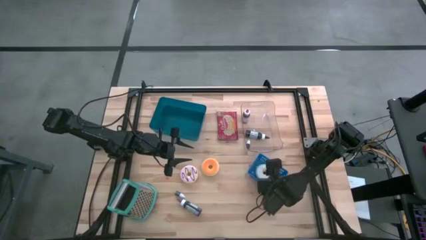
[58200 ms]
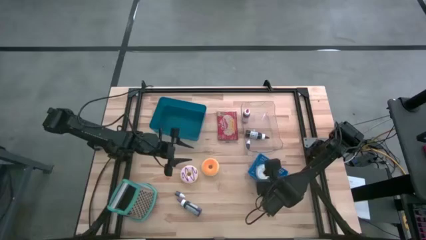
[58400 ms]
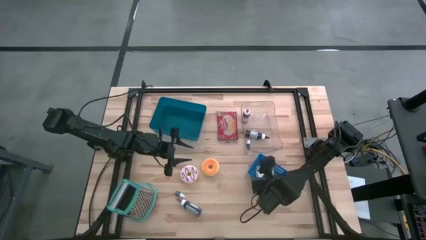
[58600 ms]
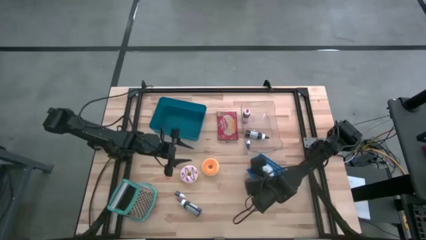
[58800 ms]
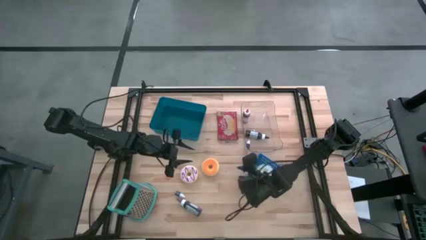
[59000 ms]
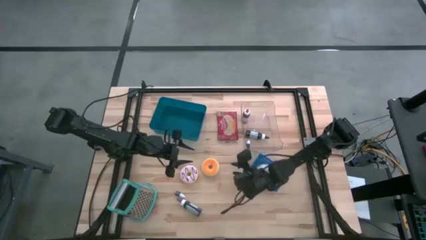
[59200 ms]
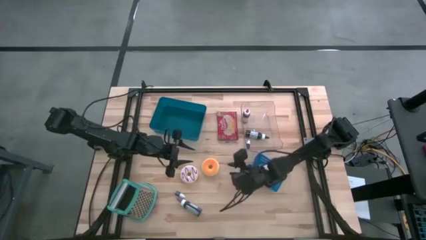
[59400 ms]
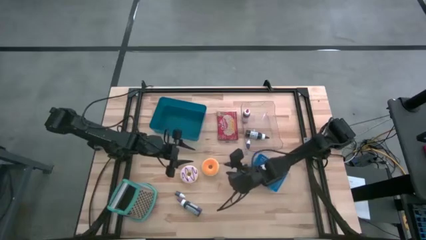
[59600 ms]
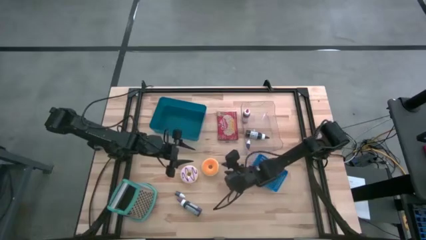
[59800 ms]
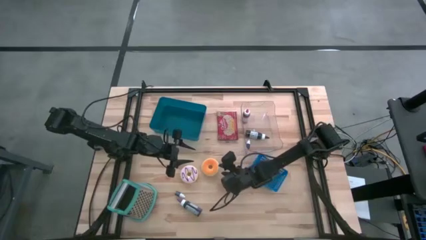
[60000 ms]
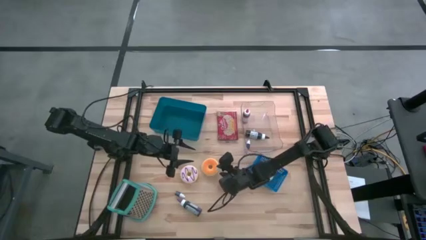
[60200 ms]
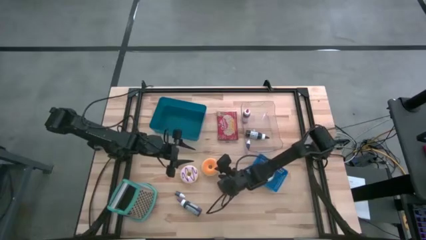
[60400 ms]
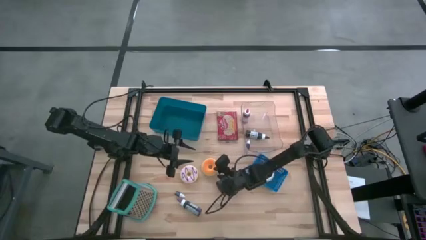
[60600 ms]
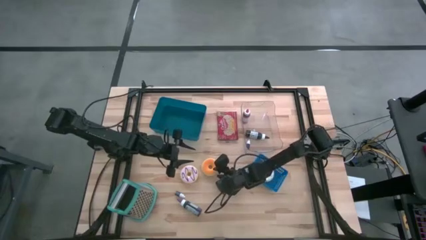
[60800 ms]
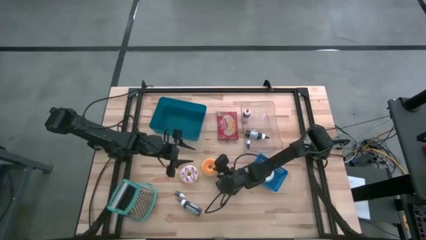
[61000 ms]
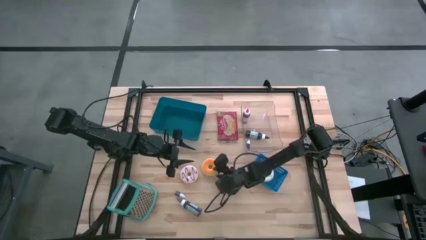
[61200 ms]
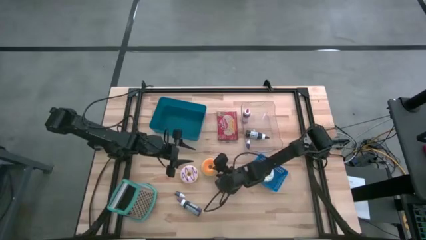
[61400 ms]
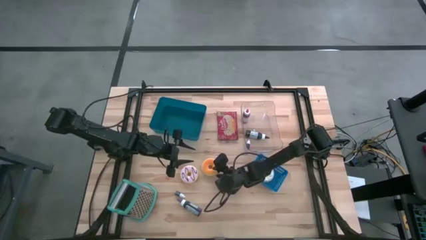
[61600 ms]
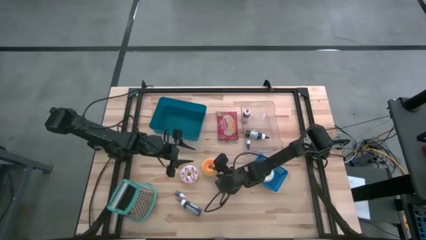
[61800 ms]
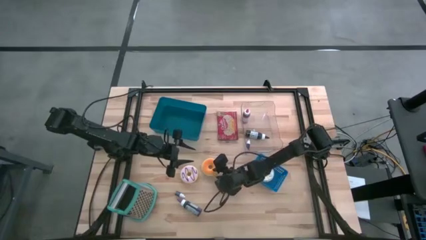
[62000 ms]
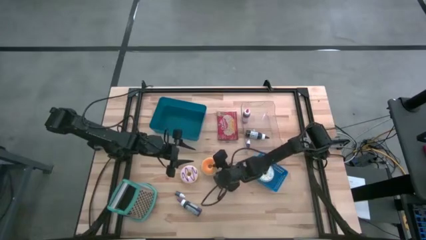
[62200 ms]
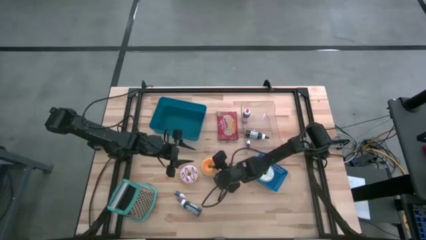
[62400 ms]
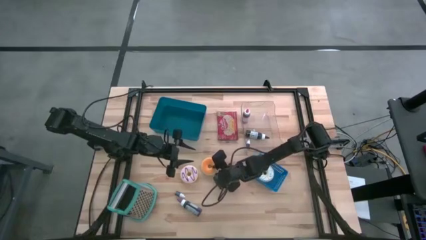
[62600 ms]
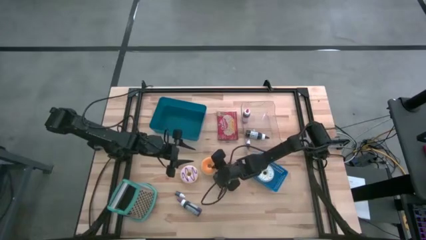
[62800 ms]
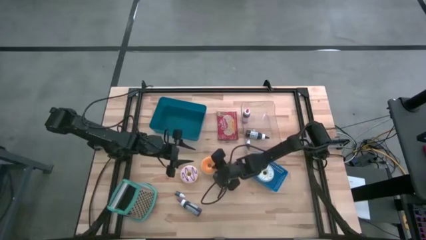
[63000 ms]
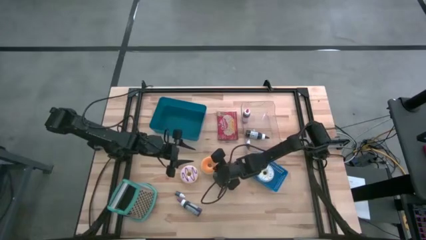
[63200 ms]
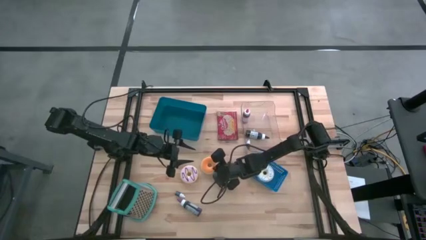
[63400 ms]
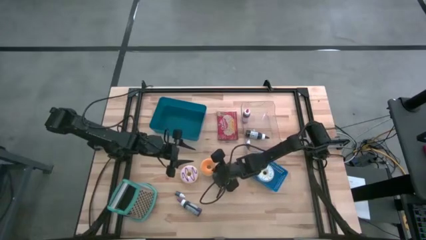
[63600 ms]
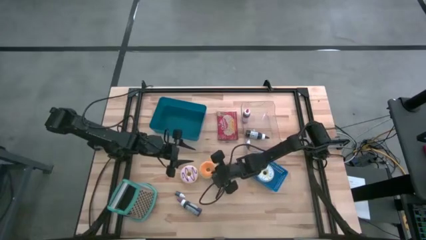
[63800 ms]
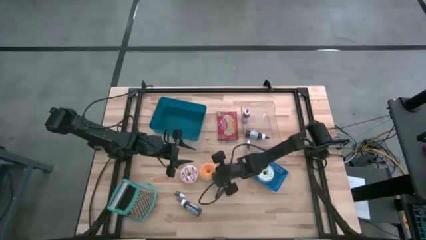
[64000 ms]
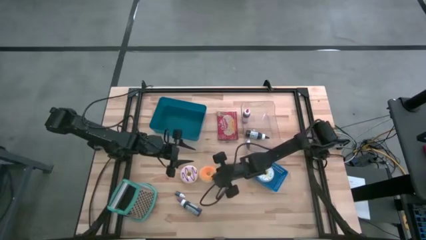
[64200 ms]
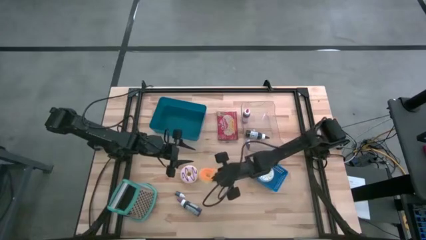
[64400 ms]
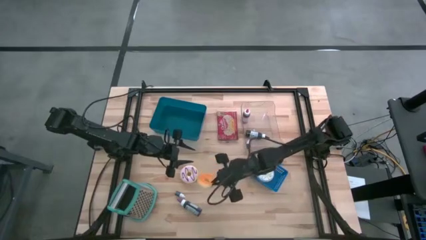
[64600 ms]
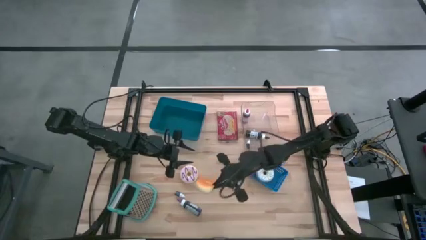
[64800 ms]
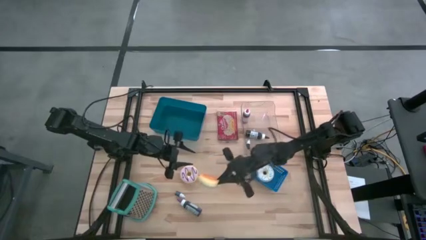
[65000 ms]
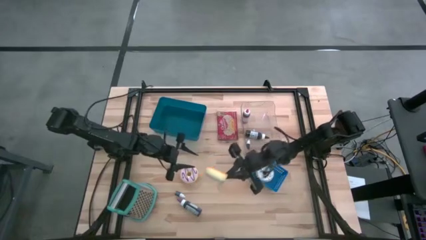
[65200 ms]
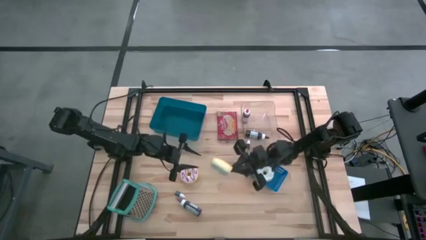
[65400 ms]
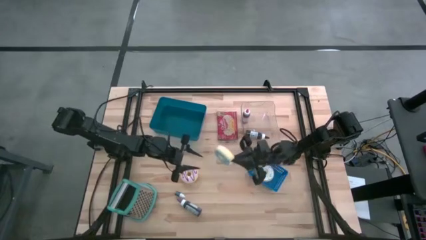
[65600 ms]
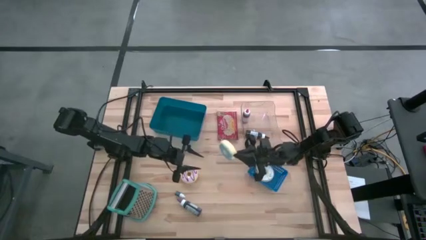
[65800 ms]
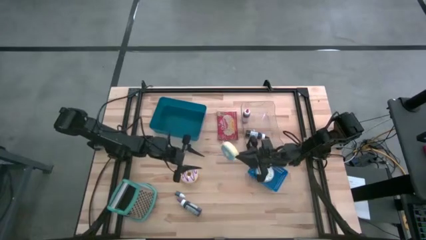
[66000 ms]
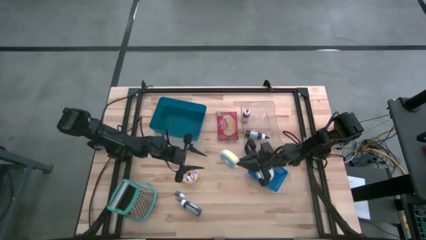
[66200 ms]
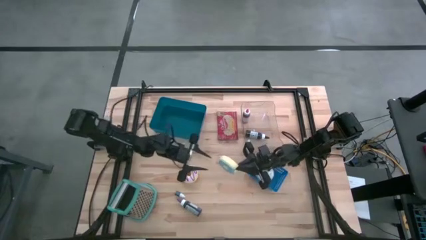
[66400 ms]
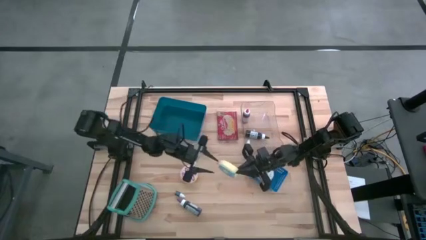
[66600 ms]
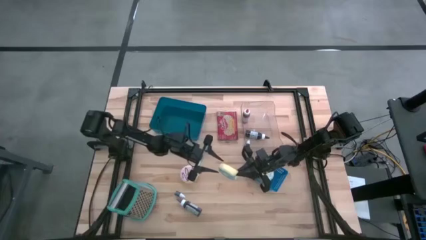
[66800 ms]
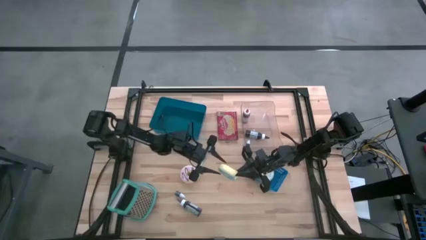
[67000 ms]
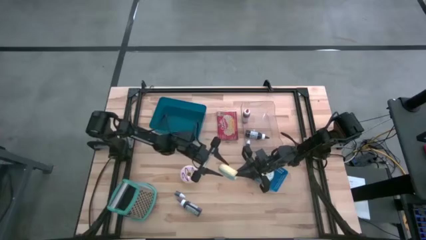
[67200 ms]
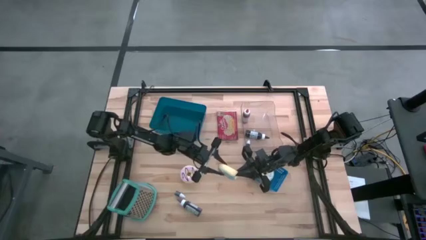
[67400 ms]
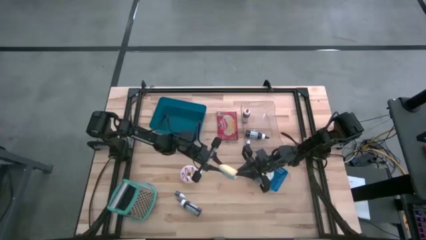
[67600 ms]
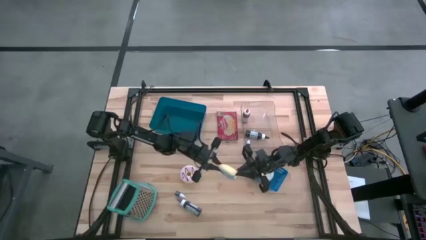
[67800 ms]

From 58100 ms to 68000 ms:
Task: Pick & Place Food Item
Put the orange doughnut into the blue bin

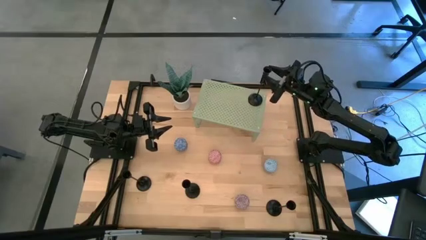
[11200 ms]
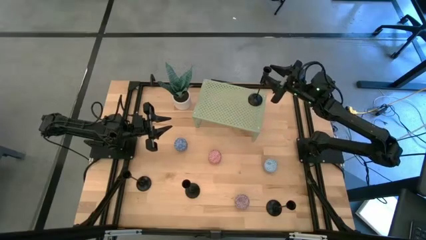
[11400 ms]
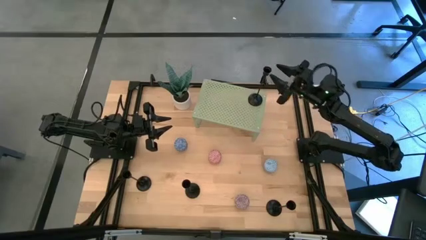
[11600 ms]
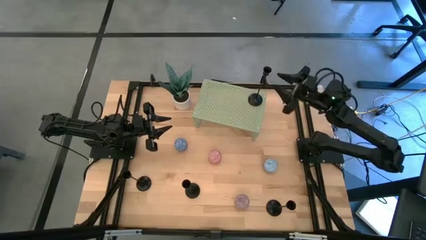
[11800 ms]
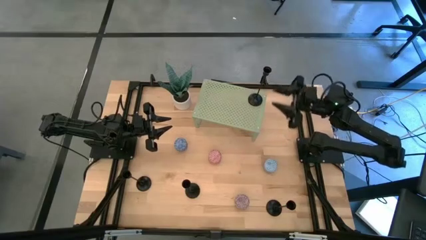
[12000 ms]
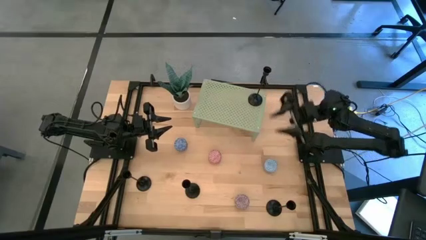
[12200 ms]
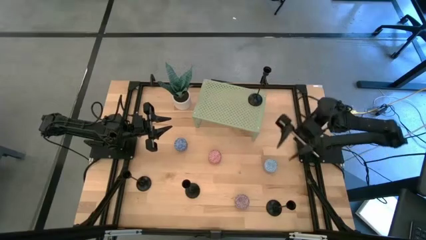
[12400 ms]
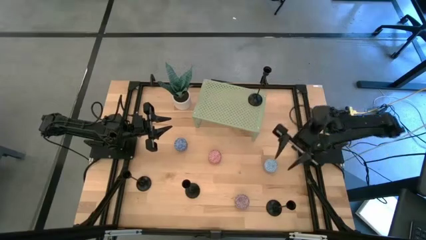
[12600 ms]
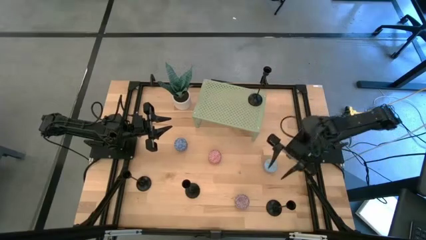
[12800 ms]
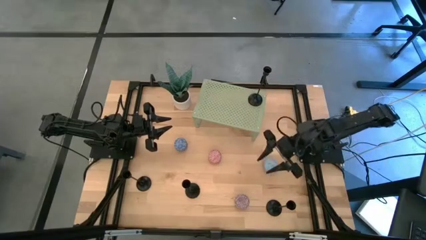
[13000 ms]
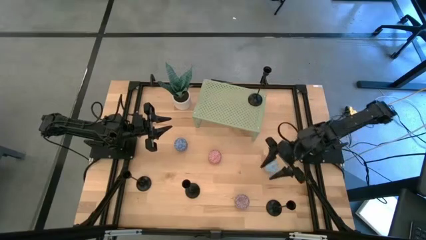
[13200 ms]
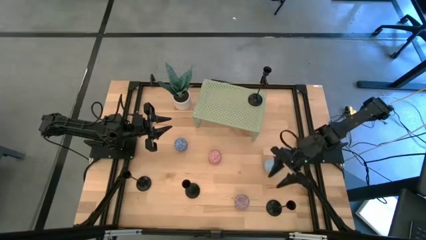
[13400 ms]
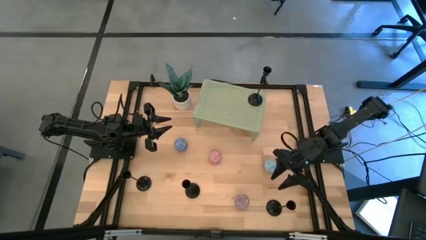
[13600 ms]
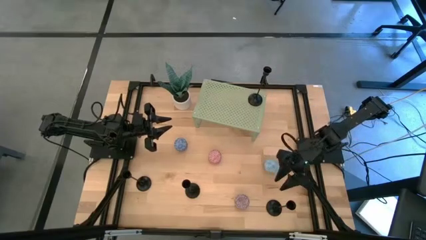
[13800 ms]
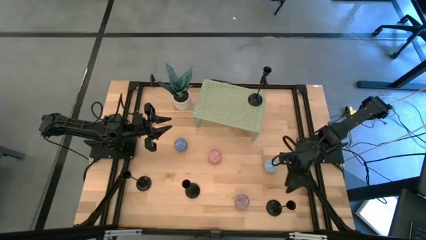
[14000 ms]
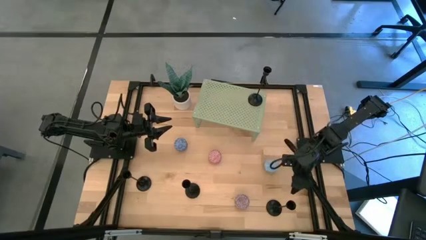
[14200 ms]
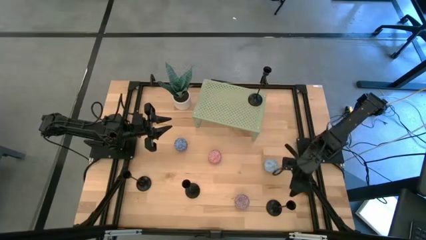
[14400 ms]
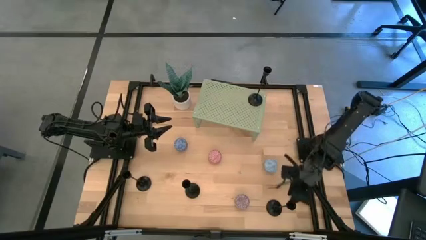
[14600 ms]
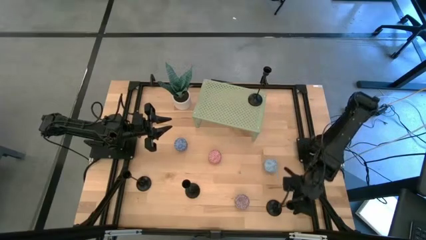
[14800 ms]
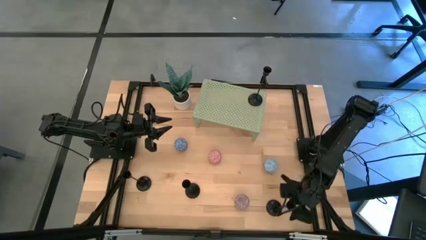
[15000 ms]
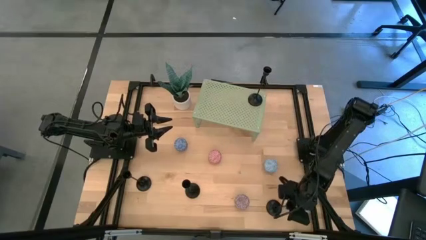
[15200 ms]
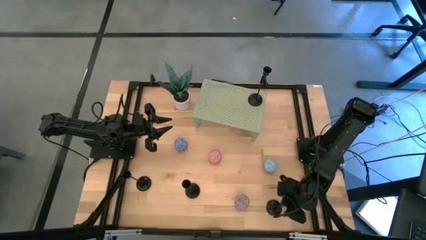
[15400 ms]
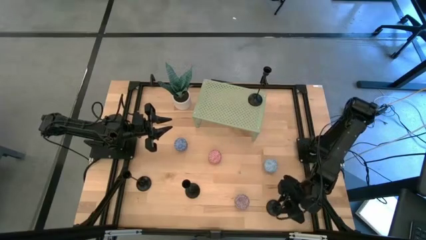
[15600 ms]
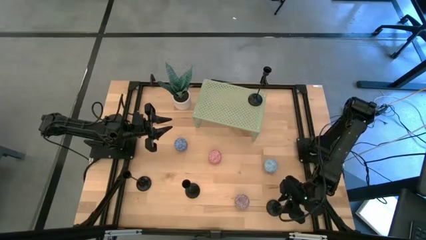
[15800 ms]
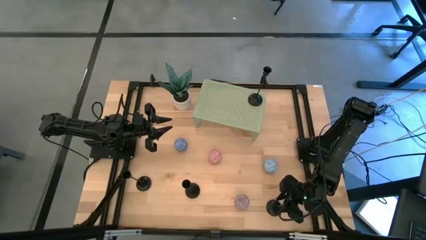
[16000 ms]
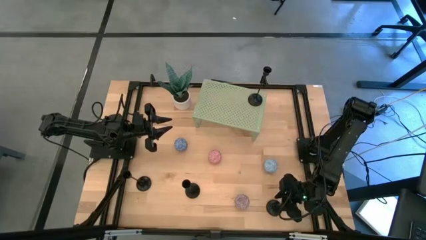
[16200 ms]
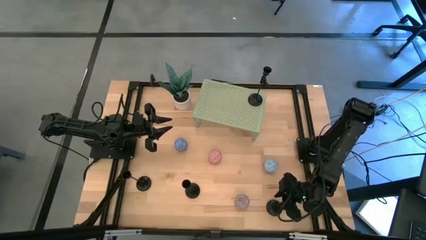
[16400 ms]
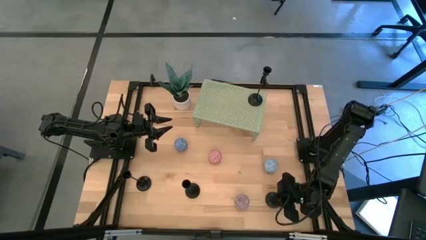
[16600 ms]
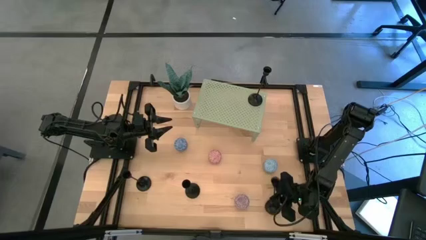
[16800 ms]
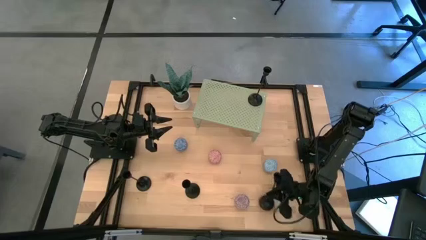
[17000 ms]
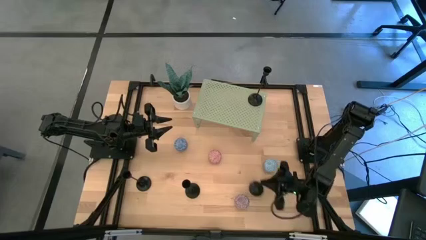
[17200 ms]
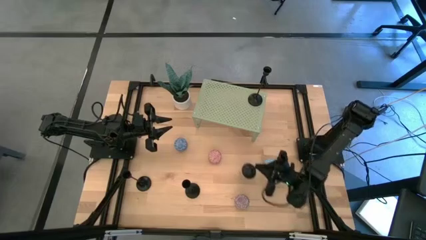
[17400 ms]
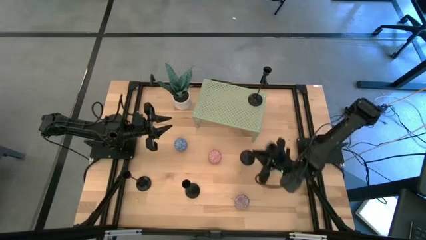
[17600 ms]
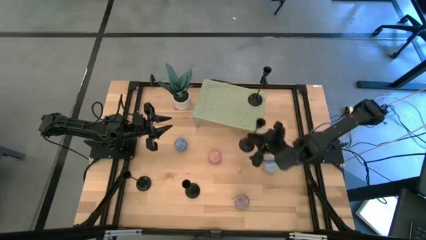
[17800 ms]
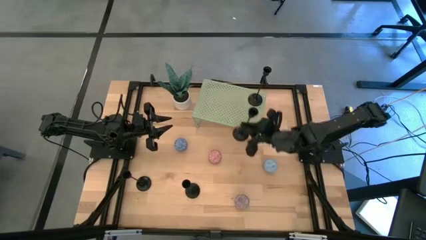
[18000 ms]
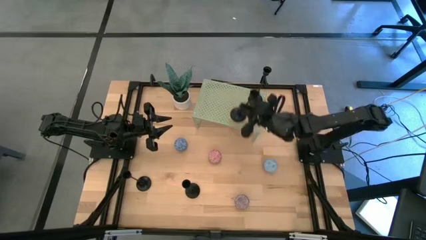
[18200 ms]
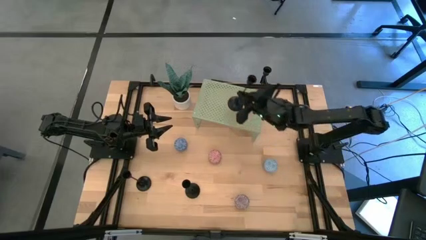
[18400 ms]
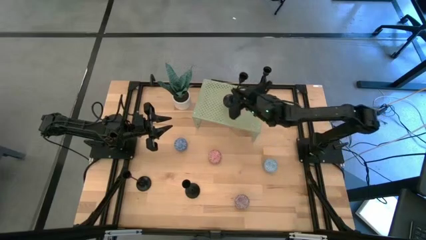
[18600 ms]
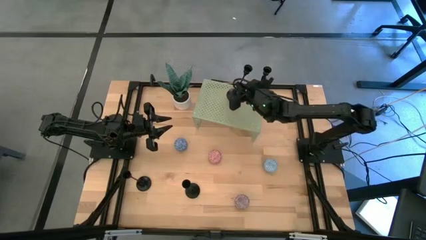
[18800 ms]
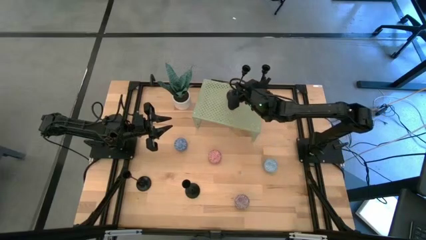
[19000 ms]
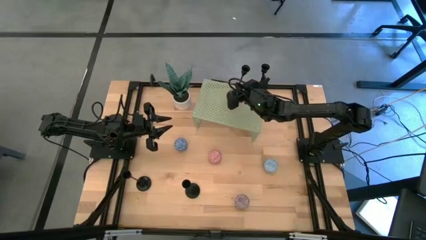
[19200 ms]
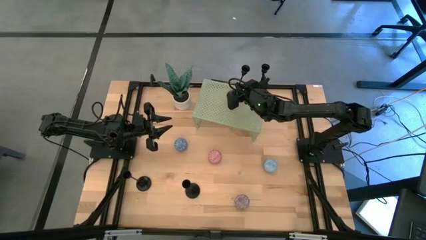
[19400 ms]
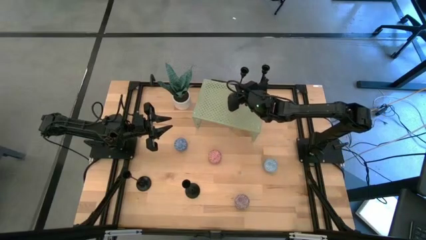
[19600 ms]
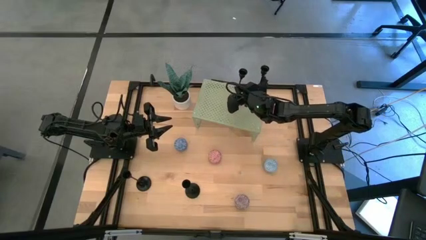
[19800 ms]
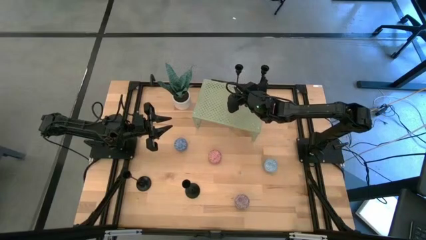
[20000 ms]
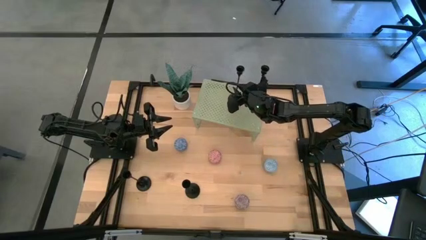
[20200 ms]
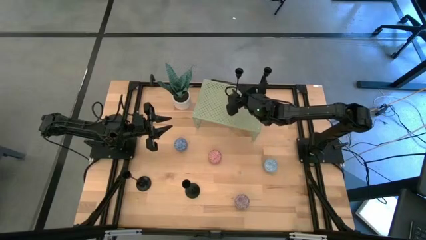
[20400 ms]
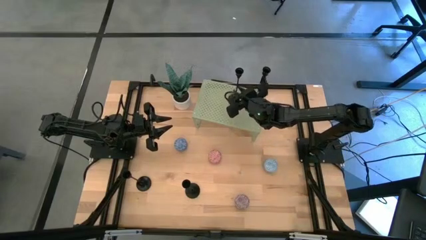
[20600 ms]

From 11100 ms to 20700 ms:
Task: Pick & Place candle stick holders
Put the black candle holder on the shelf aligned with the other black candle holder
